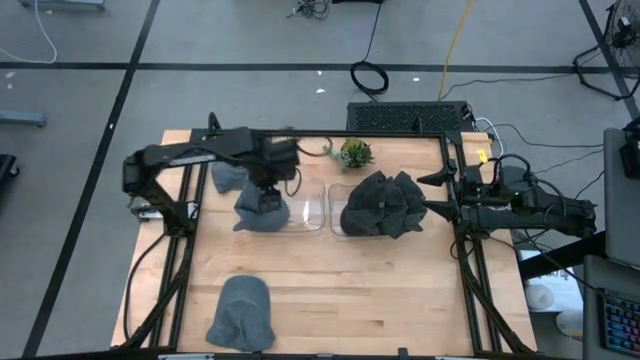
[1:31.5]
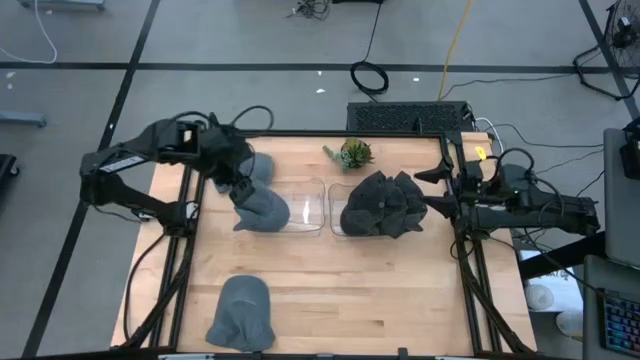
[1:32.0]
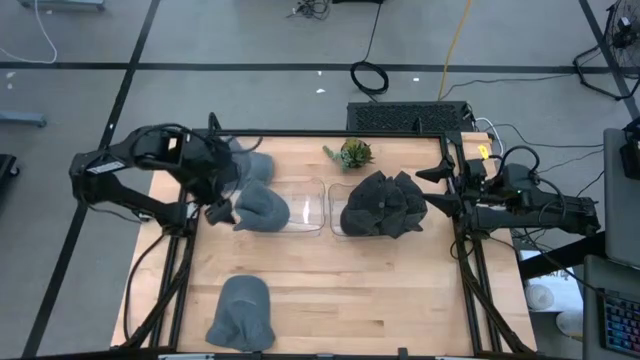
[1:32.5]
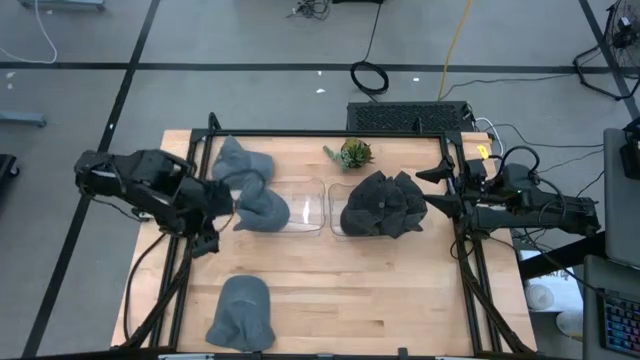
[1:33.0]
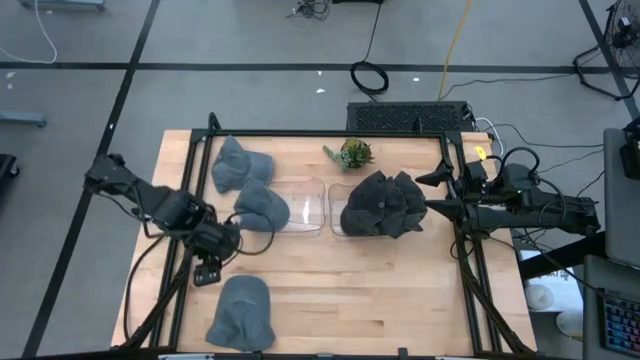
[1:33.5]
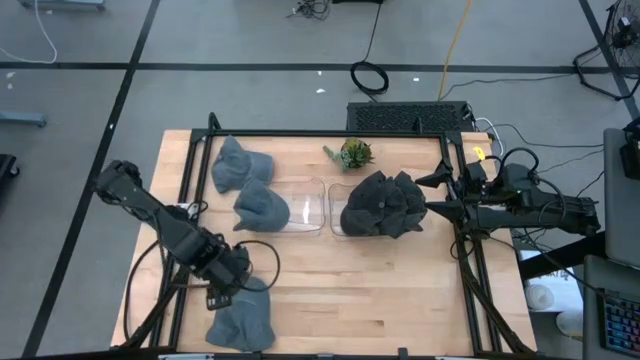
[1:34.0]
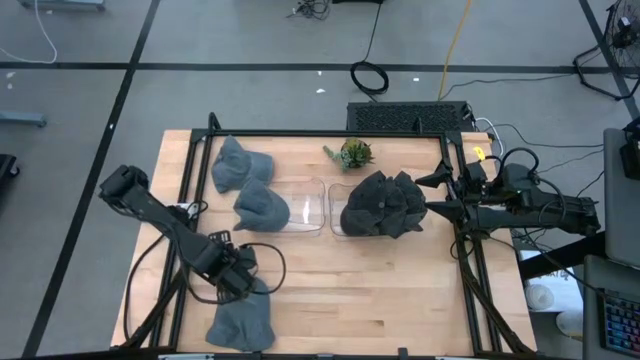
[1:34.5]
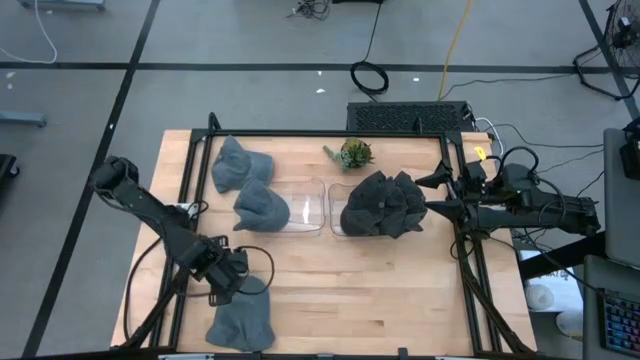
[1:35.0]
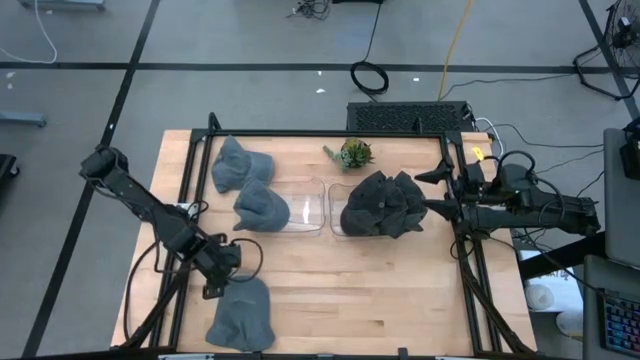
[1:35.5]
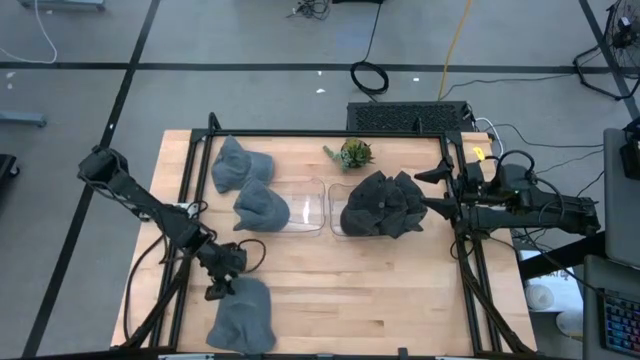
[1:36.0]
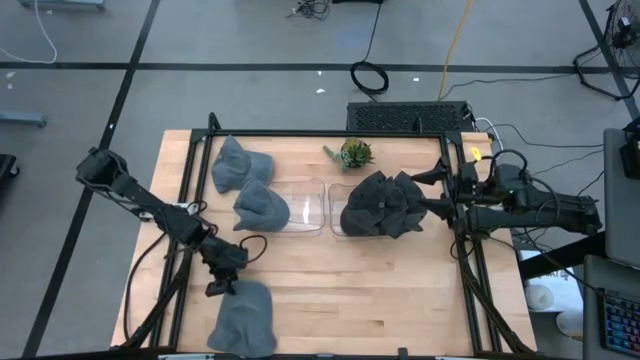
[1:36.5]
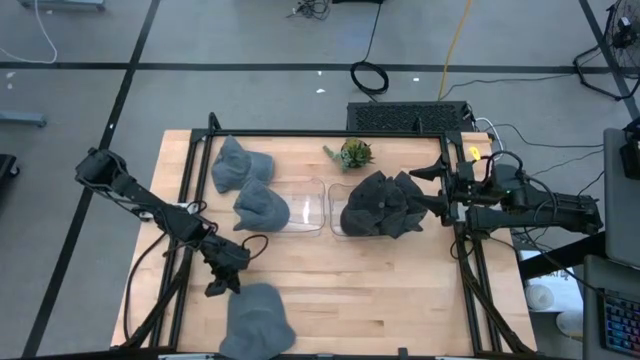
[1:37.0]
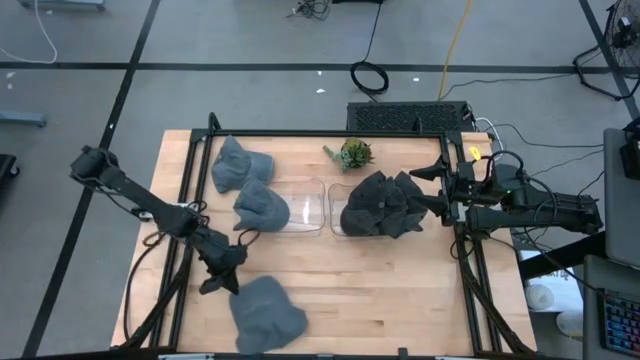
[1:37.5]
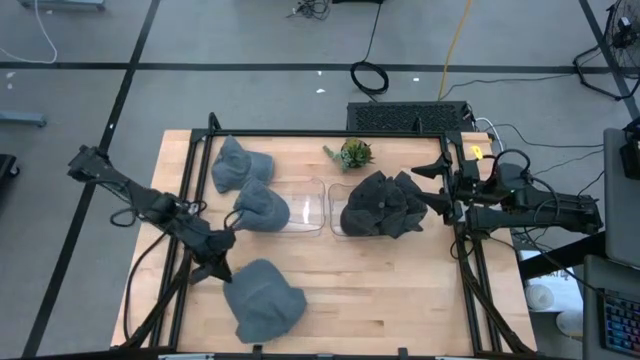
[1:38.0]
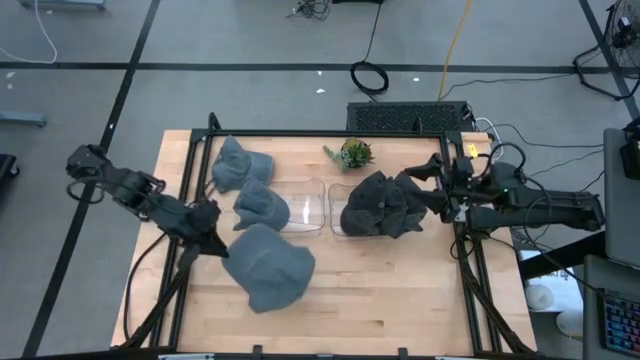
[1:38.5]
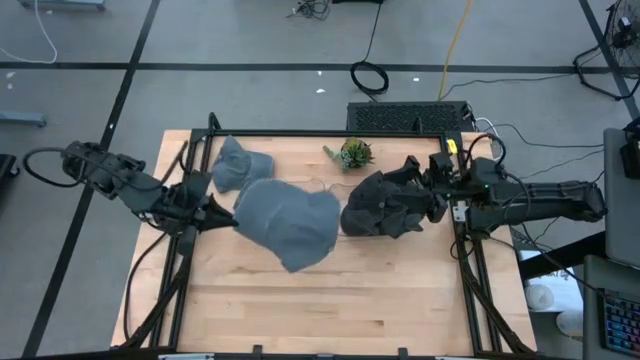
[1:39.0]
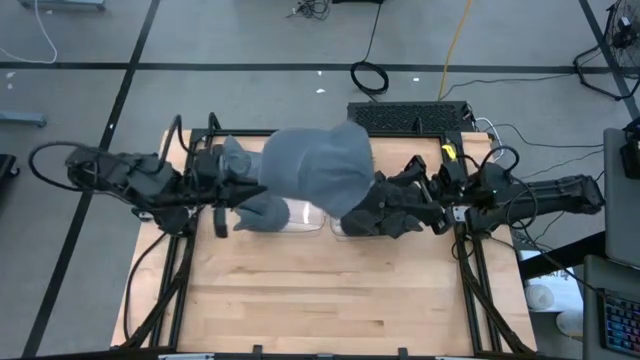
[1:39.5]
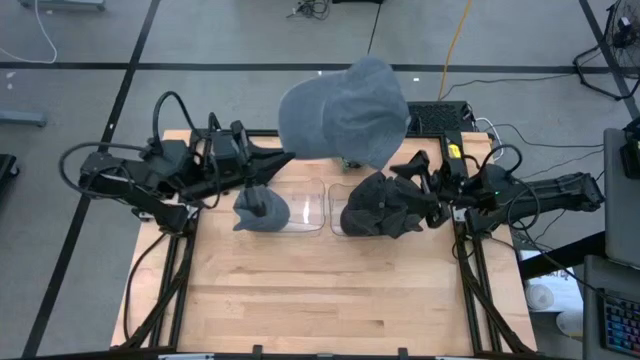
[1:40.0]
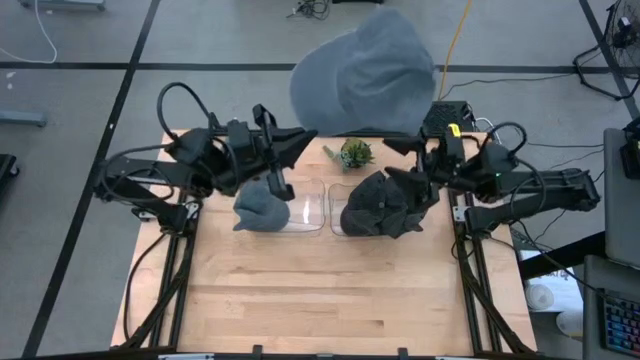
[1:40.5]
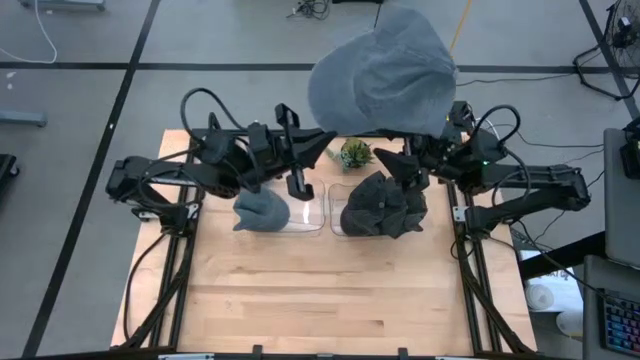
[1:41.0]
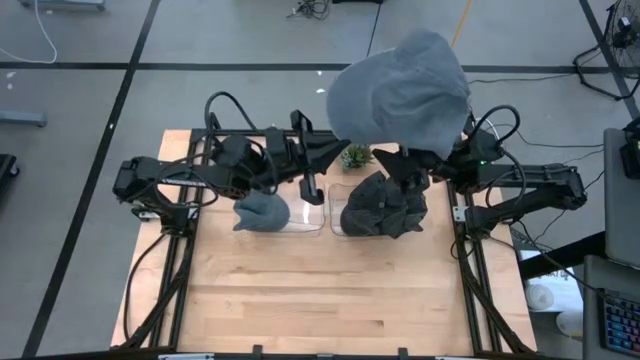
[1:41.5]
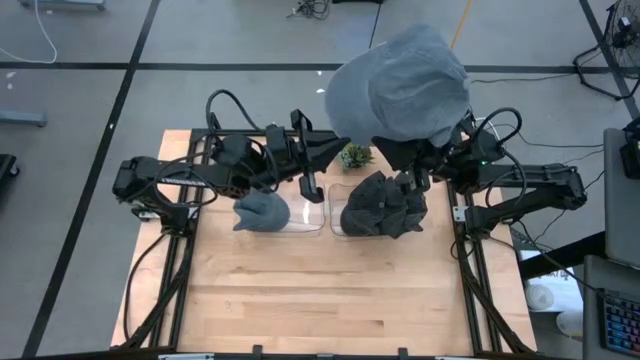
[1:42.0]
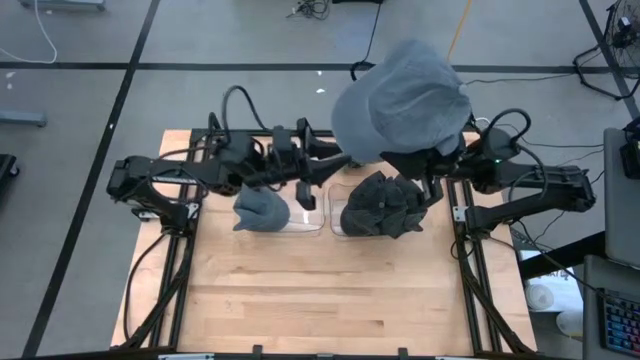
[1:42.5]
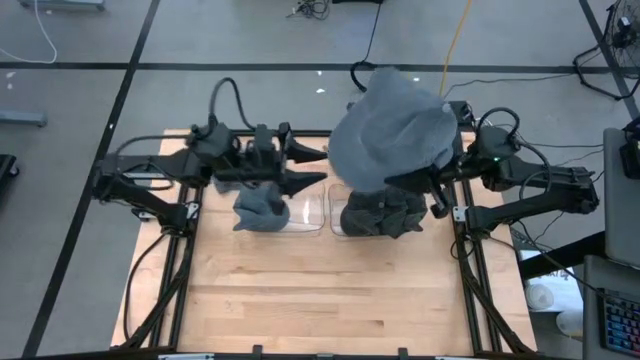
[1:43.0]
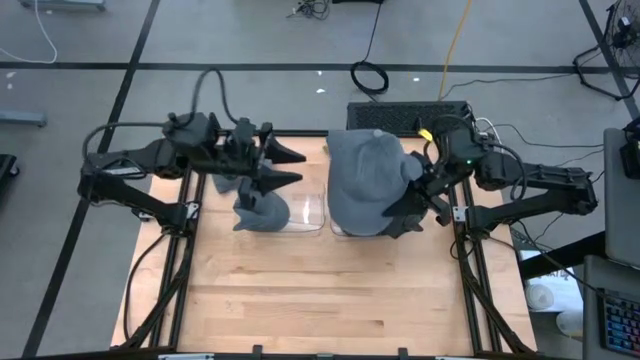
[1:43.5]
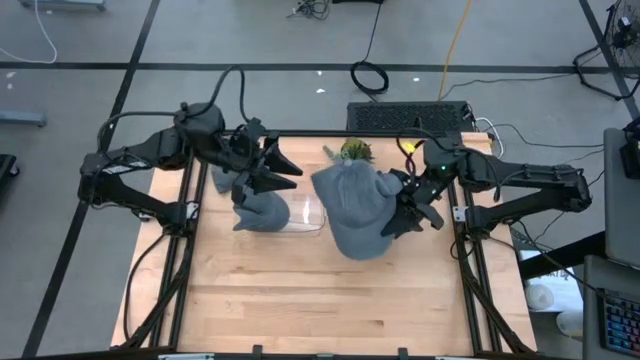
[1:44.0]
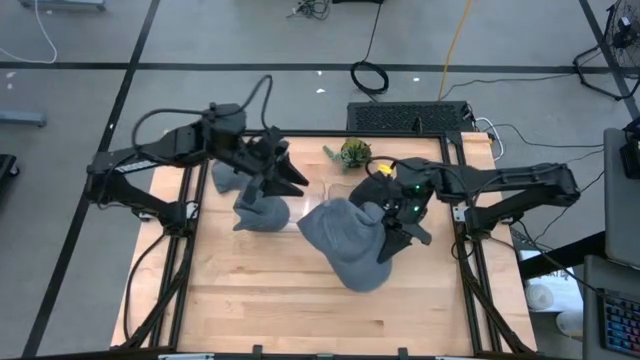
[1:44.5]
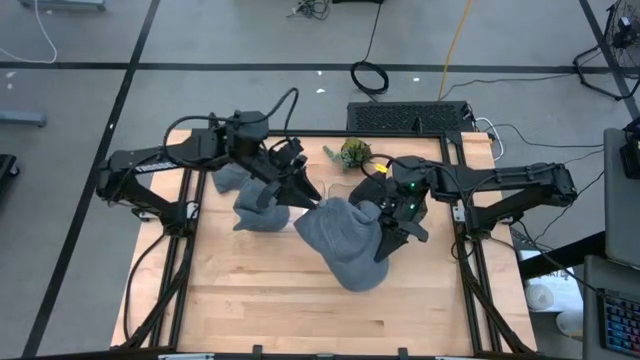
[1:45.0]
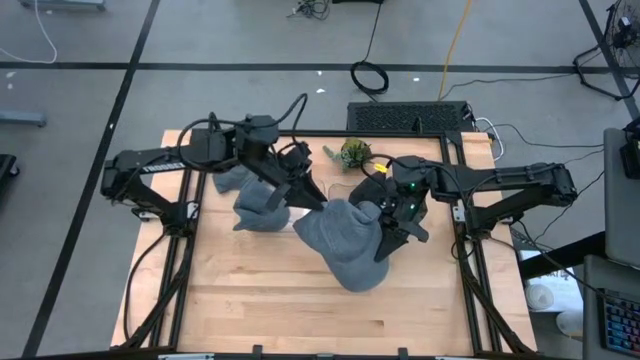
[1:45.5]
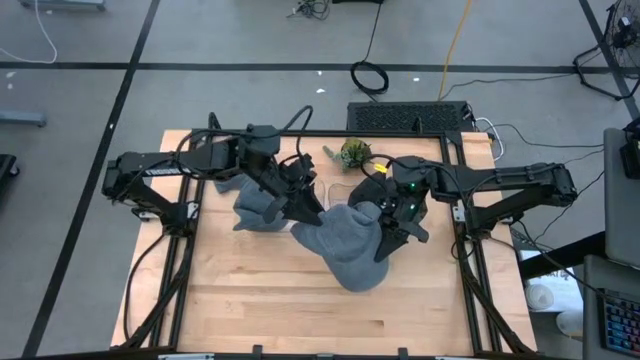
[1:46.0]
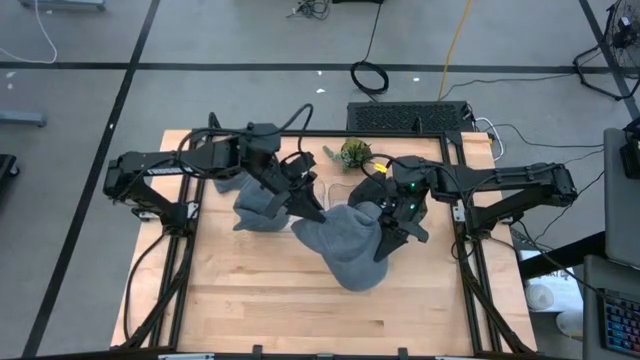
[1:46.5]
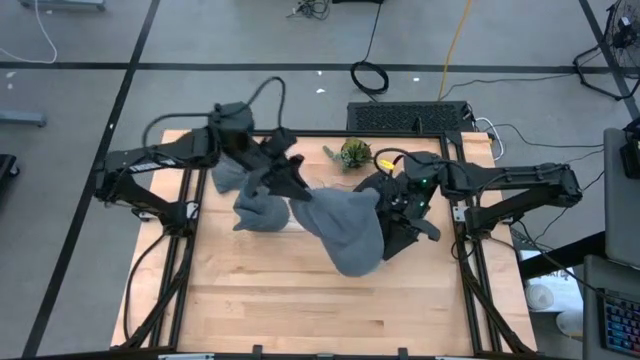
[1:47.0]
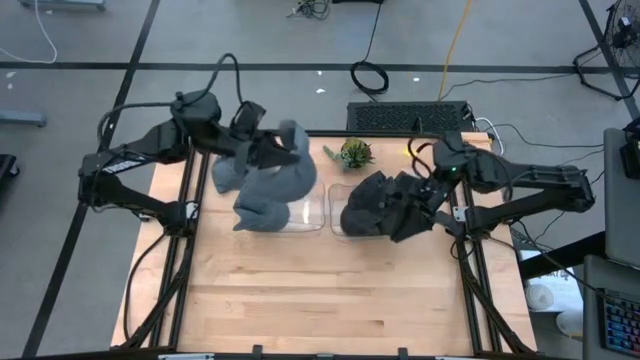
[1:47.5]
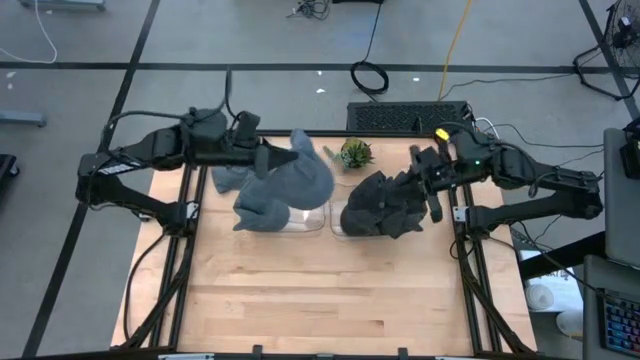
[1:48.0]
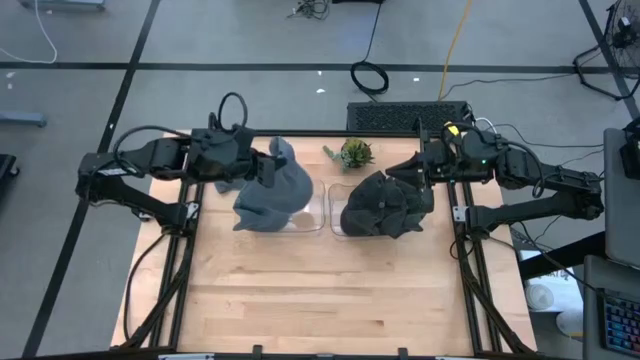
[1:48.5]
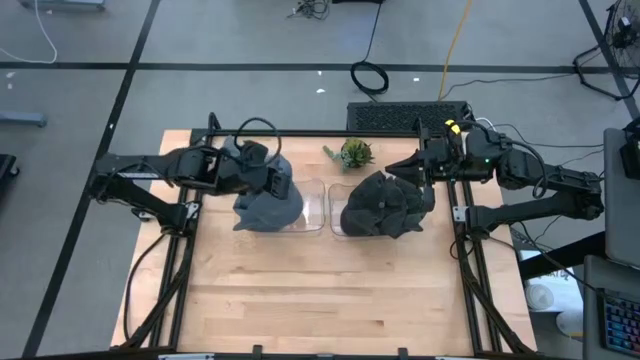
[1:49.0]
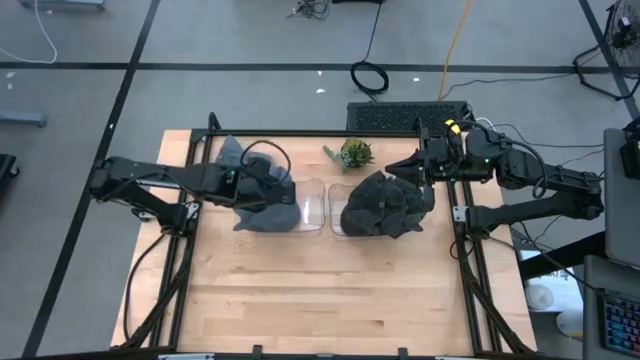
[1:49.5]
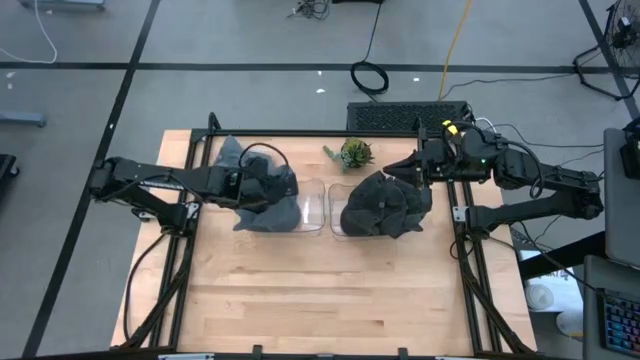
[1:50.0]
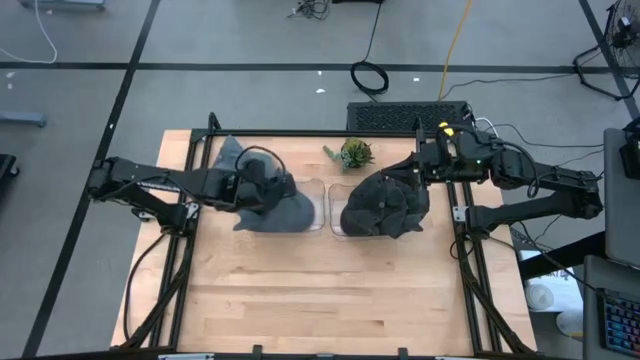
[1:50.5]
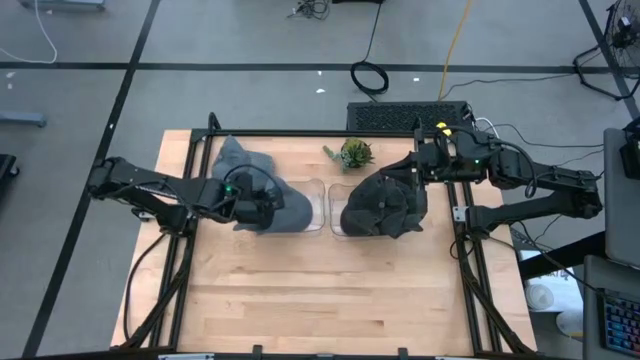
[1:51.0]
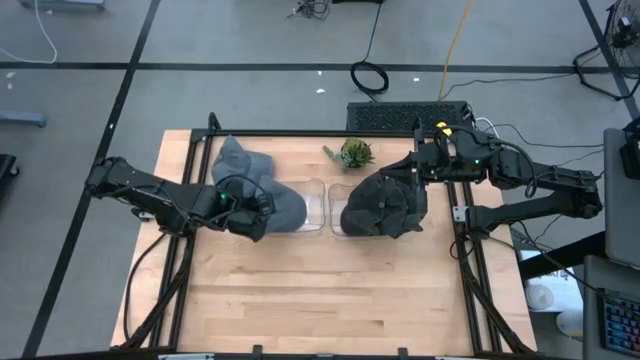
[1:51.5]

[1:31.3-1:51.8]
Task: Pick & Place hat
Put the bottom gray cap into the left transparent bin

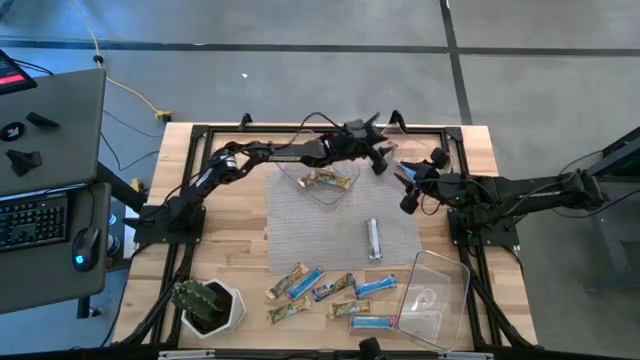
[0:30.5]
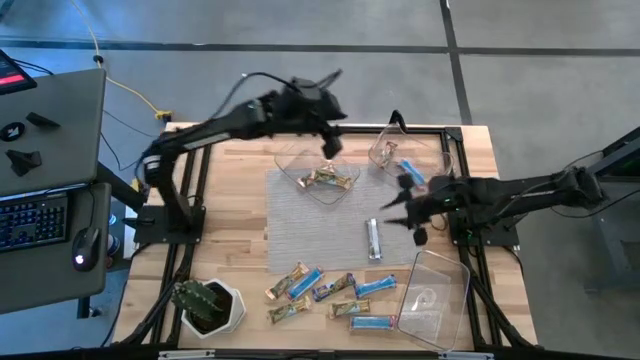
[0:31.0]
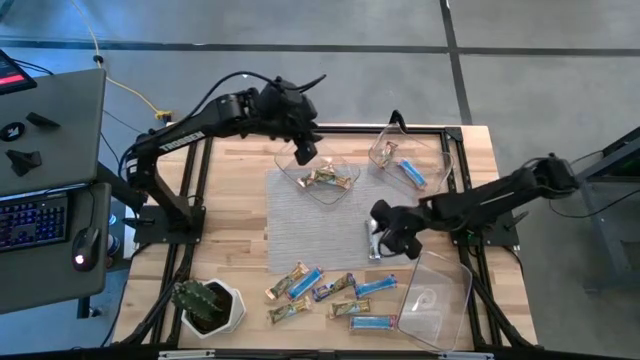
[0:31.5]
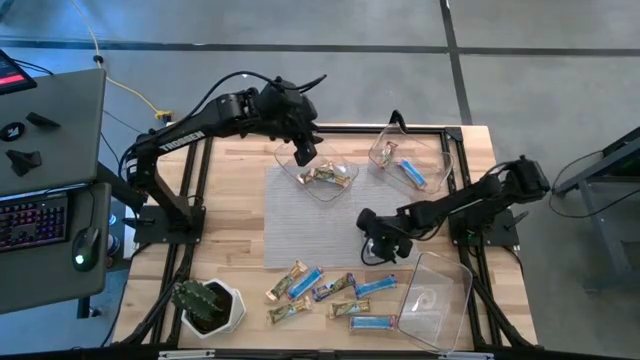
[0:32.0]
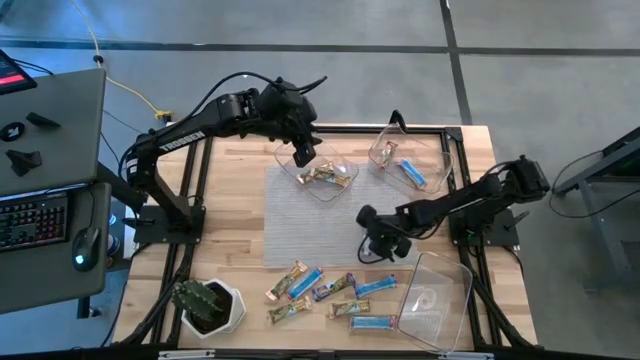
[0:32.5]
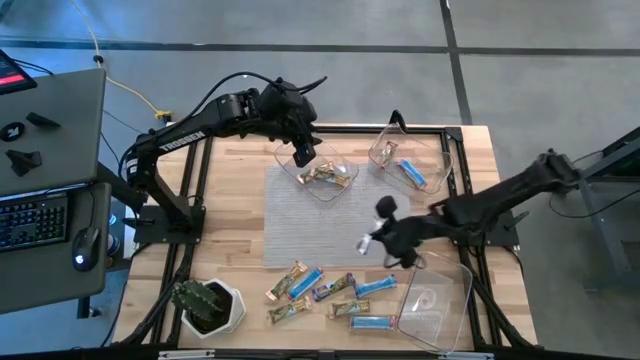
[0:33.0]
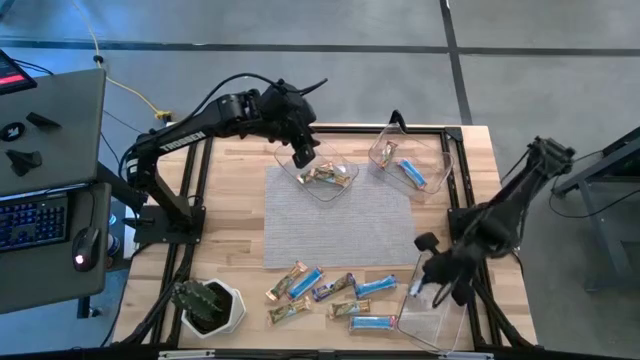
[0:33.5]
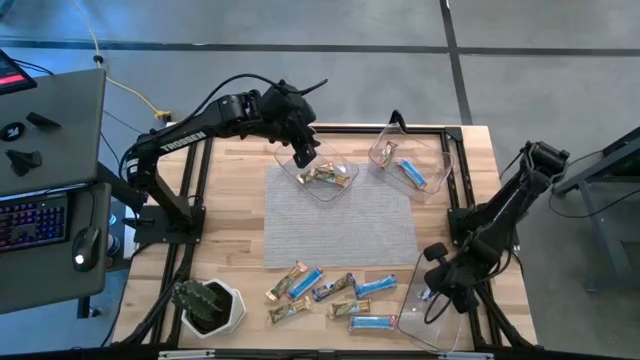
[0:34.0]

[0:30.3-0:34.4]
Task: Pick and place Granola Bars by type
Put the blue granola bar into the bottom right transparent bin
